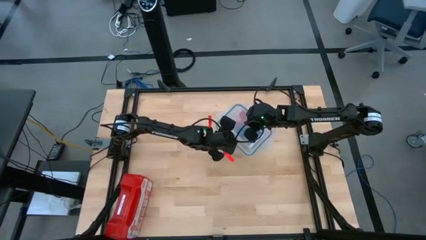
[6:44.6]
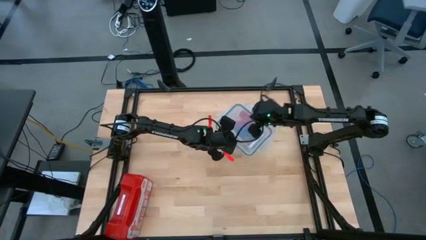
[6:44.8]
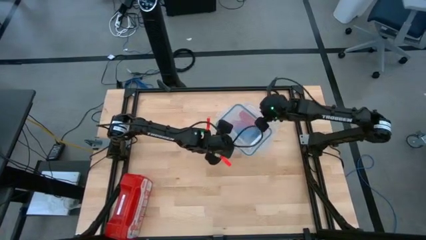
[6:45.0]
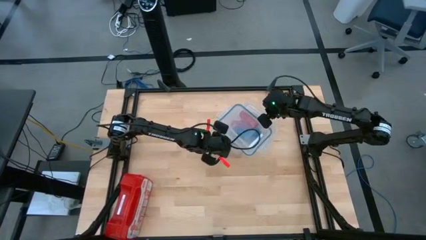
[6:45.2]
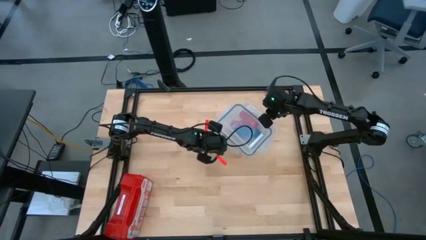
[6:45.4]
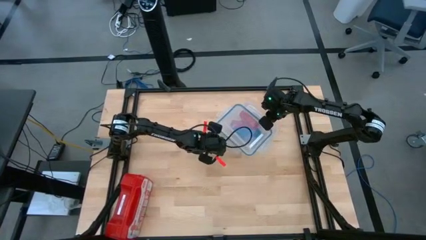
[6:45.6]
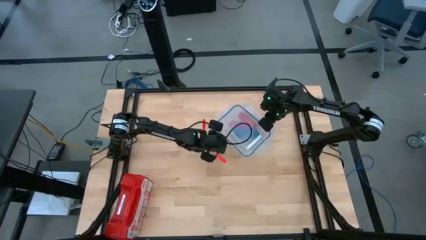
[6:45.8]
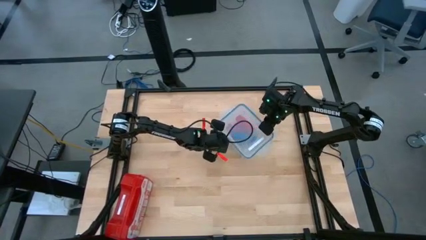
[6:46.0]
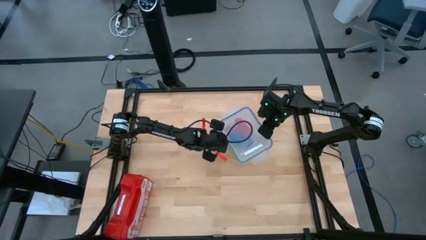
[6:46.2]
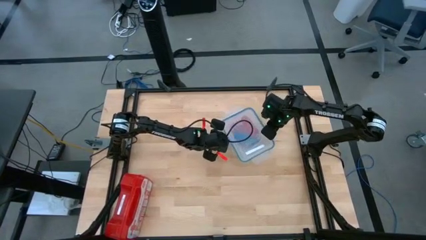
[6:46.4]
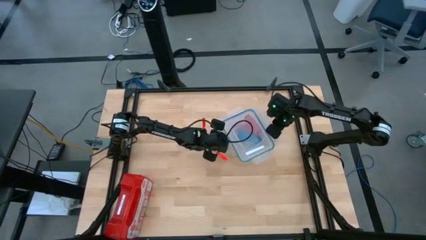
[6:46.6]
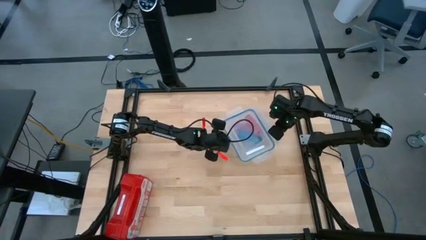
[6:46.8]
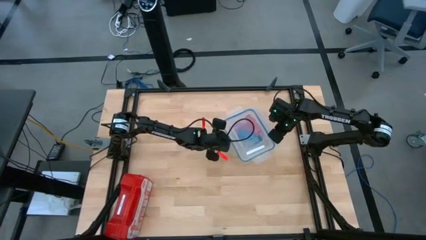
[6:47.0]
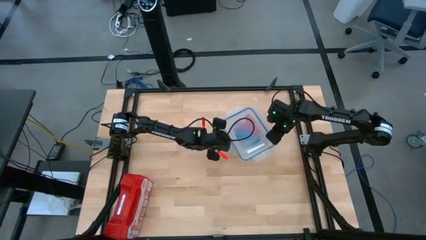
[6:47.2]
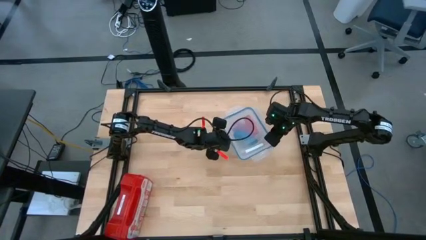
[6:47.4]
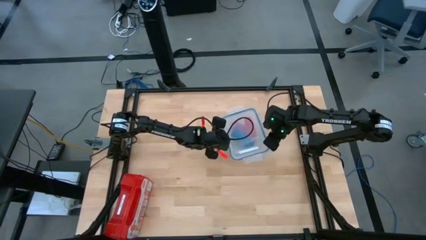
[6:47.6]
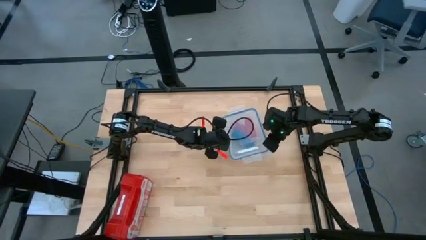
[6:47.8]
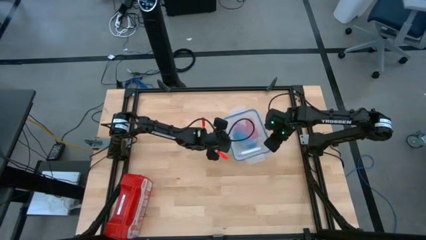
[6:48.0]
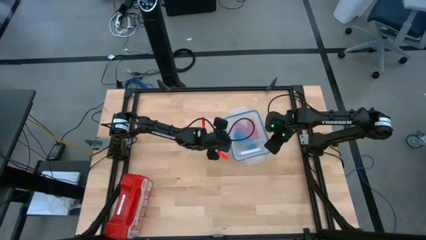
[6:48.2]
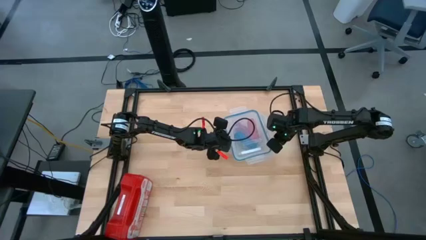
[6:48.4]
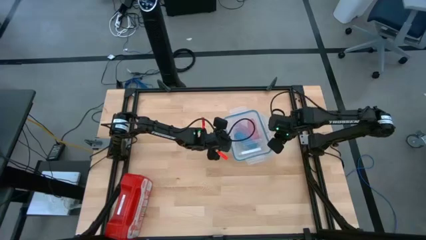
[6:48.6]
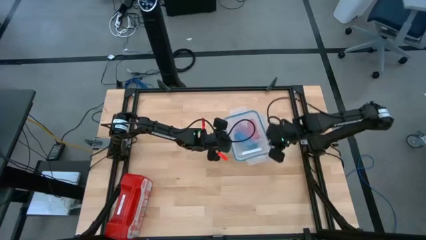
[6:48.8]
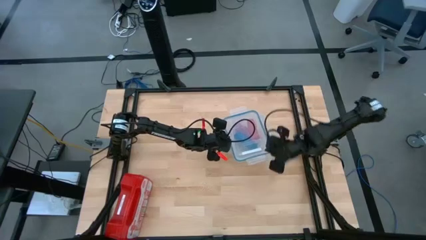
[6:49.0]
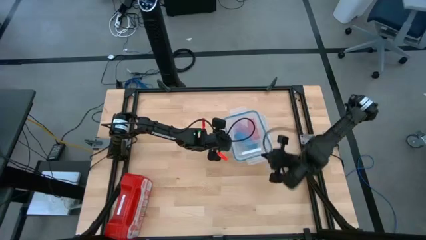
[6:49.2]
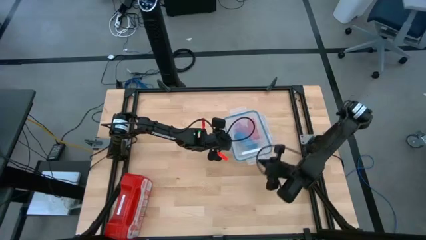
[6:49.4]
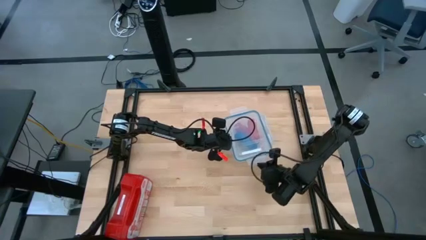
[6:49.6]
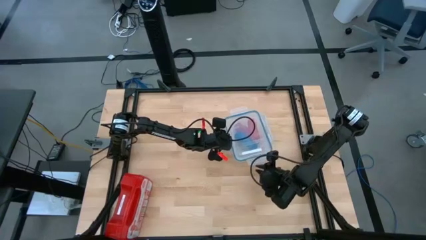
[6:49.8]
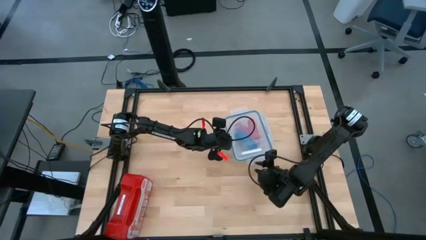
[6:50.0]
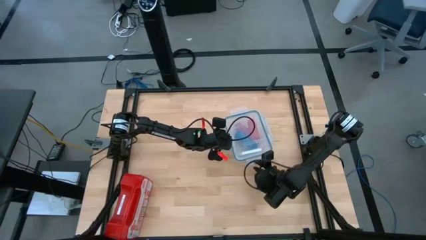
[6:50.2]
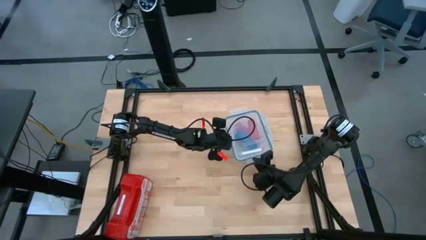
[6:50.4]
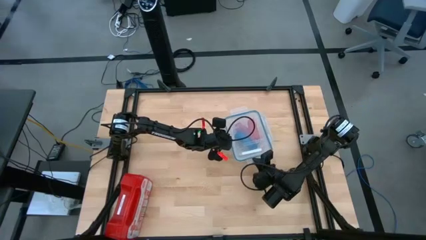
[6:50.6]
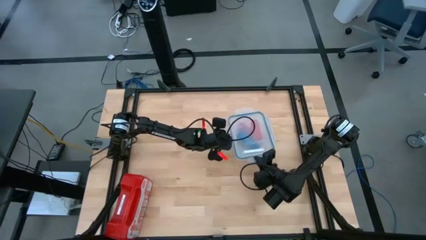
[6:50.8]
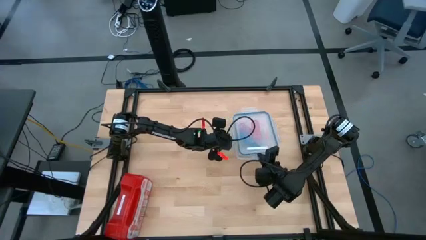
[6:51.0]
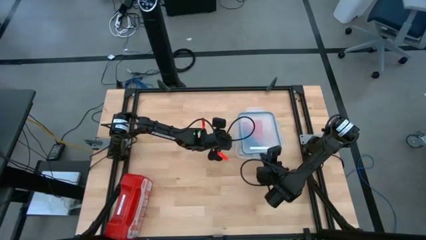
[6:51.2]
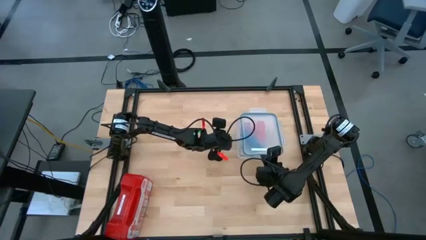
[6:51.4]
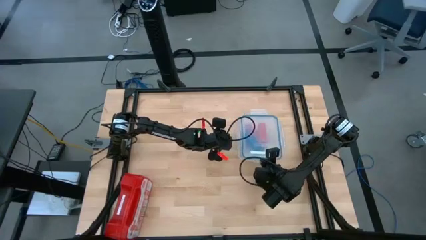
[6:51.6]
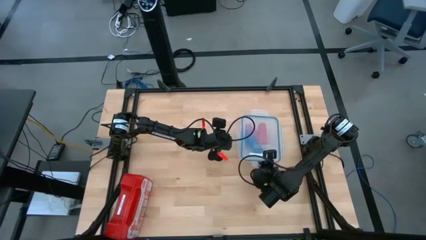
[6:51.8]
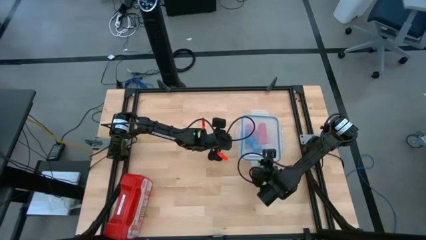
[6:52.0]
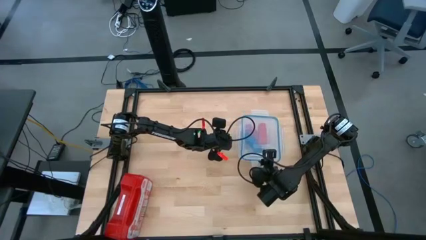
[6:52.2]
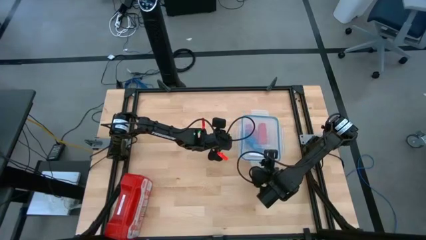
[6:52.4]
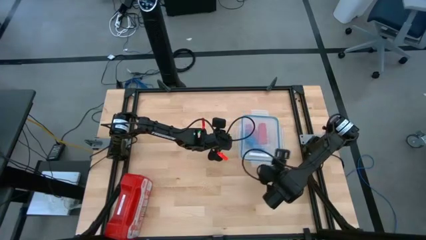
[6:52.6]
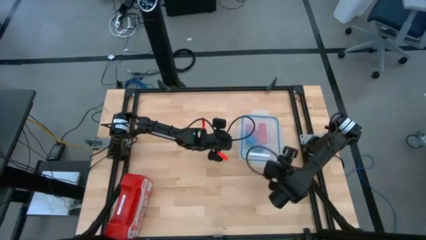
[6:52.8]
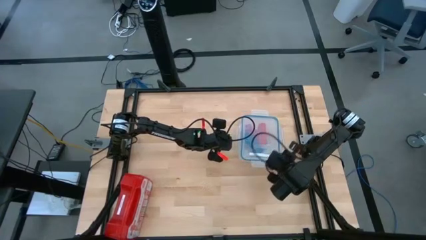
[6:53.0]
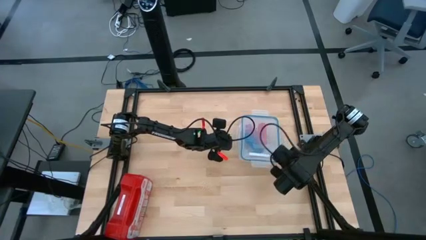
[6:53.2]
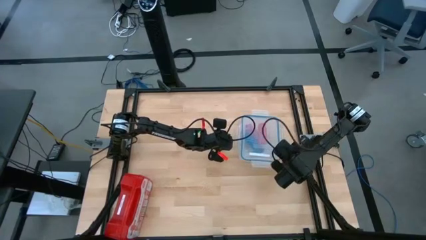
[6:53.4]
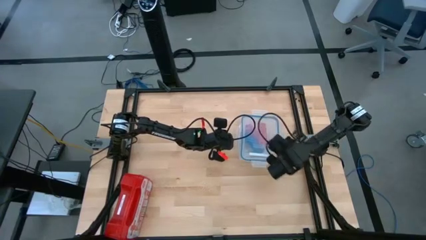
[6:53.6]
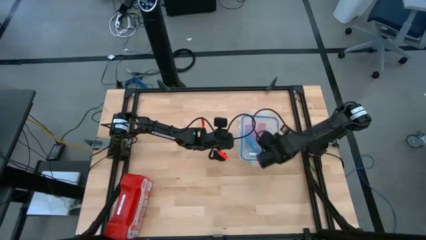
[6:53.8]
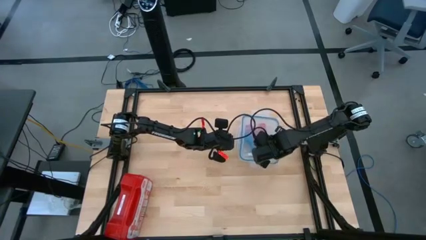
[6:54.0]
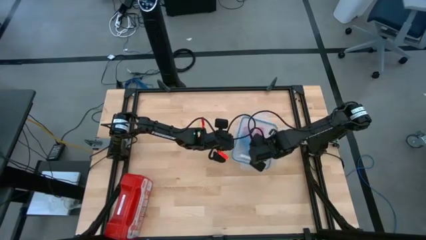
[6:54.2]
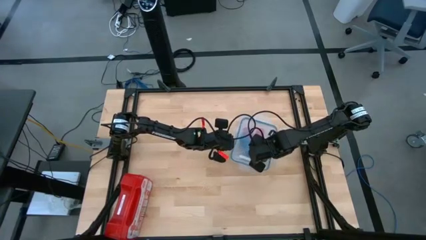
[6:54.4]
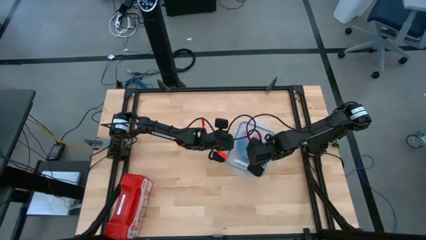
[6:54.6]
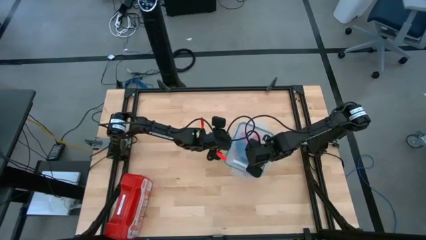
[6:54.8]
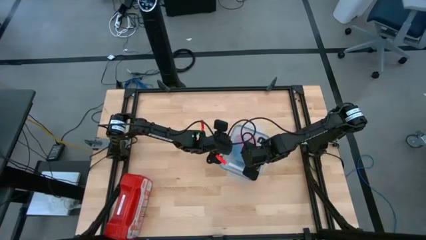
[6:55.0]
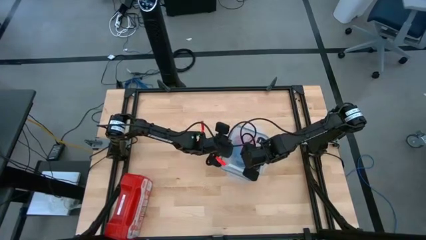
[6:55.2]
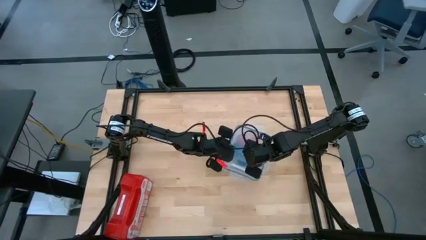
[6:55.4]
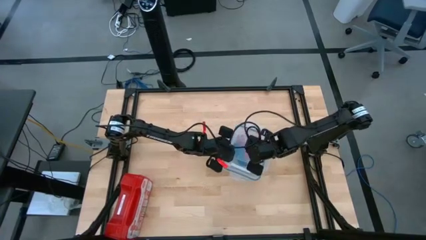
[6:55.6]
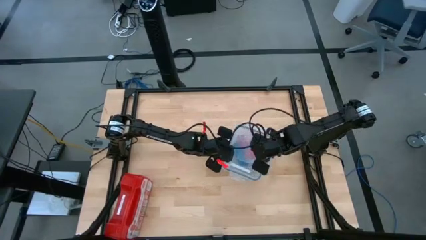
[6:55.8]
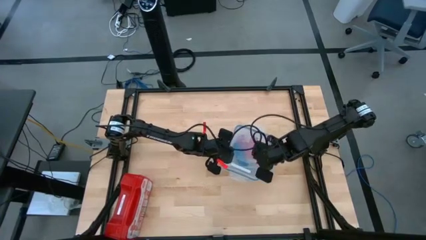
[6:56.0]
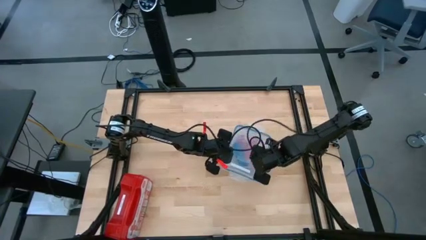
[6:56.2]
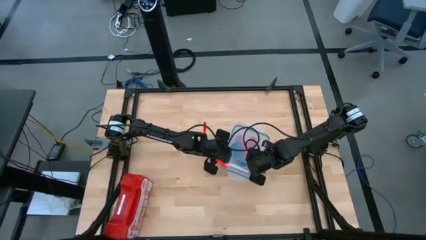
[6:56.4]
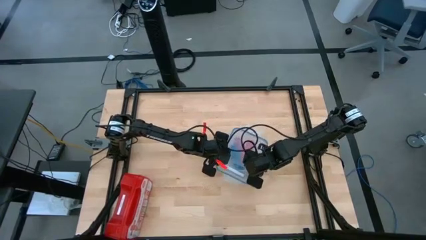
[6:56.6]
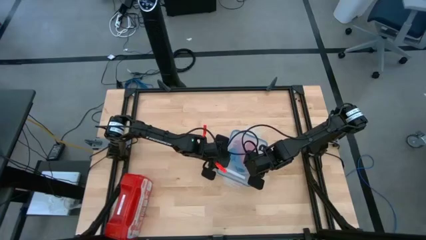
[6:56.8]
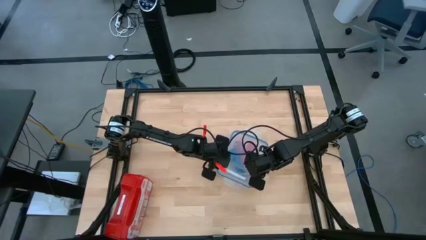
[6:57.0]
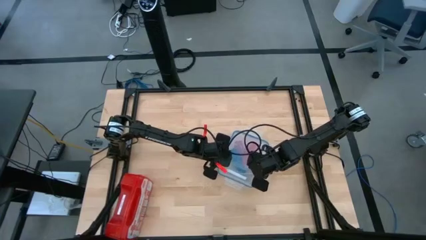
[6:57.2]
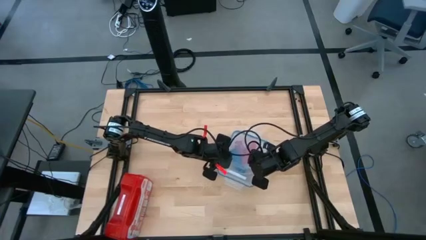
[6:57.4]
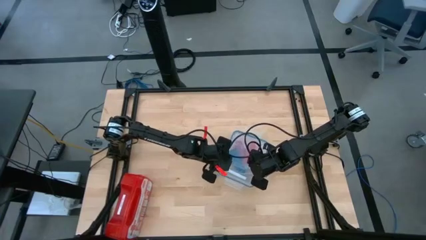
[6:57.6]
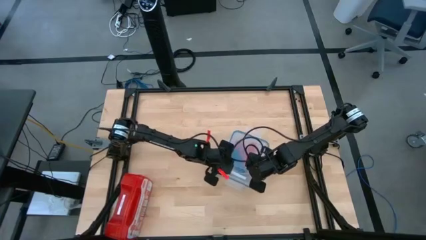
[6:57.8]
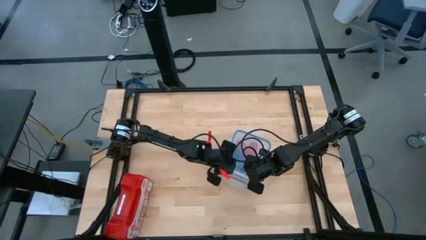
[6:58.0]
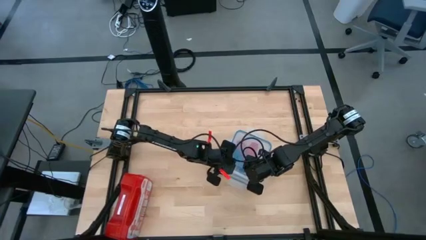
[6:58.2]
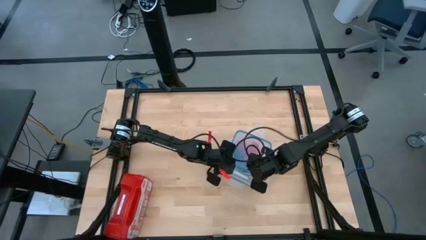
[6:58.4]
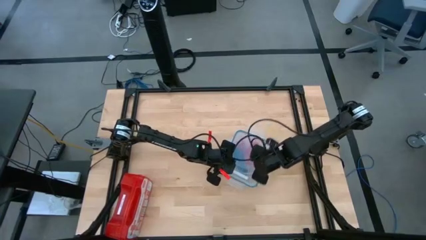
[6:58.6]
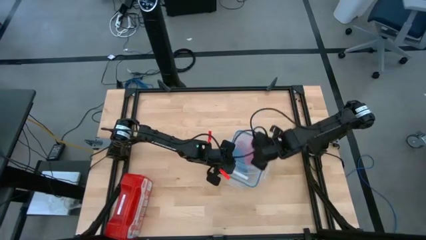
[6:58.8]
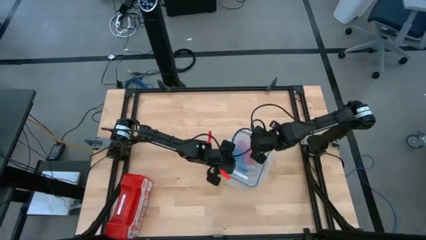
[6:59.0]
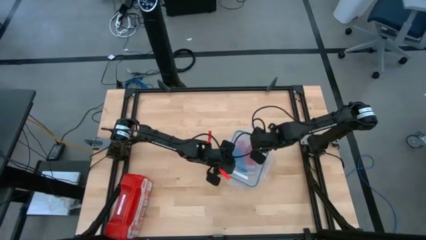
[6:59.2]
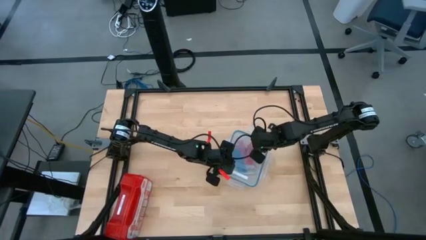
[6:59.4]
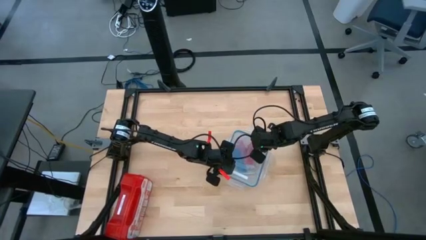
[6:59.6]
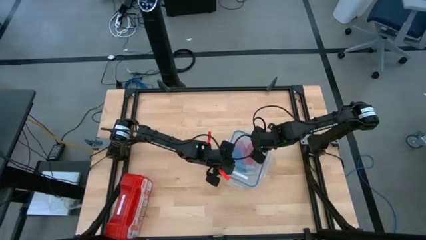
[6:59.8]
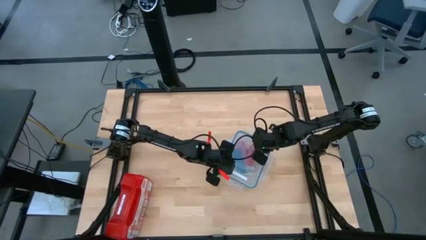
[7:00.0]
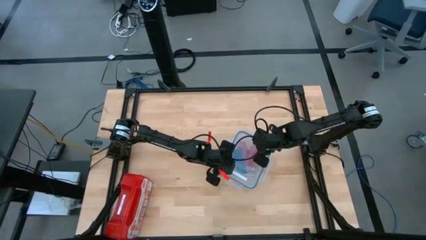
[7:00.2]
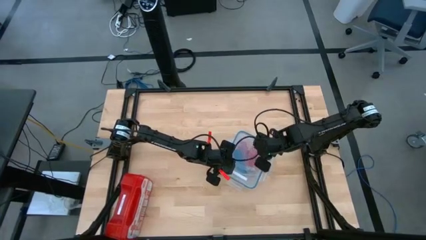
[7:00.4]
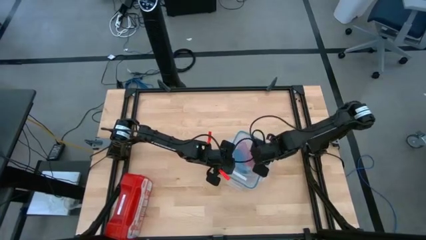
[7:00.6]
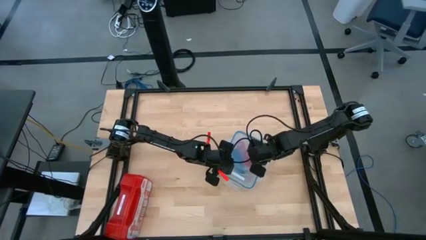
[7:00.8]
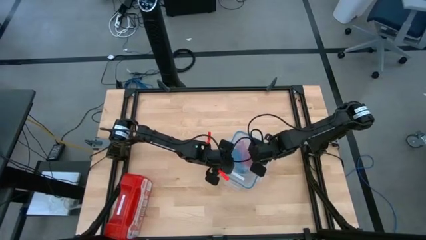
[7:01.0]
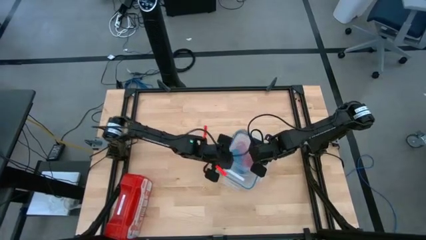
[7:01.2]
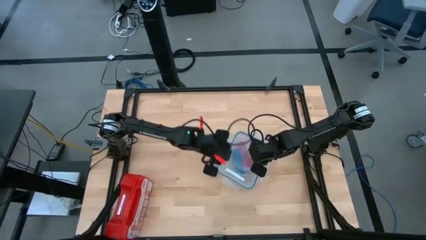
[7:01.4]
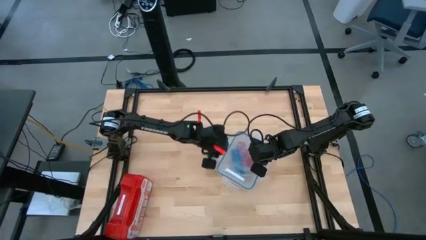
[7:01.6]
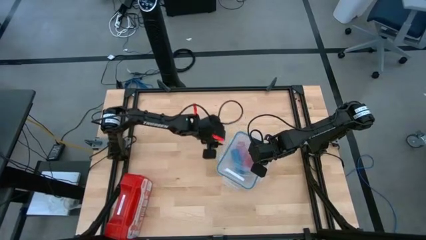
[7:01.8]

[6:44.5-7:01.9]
Task: Roll bandage
Close the transparent container
